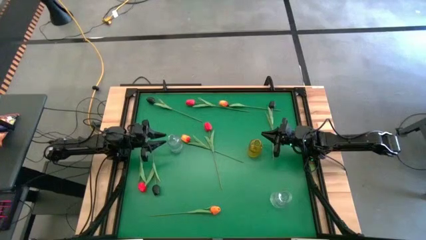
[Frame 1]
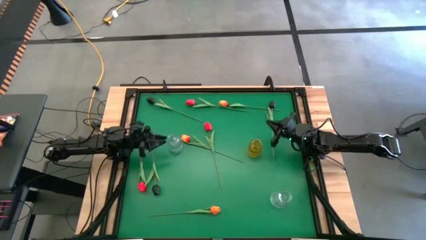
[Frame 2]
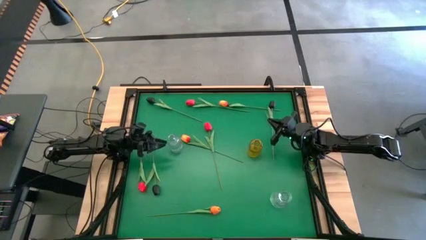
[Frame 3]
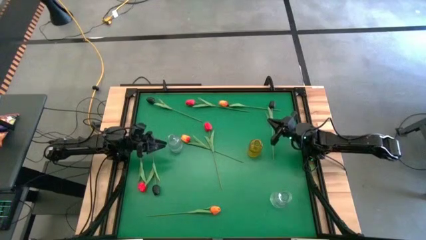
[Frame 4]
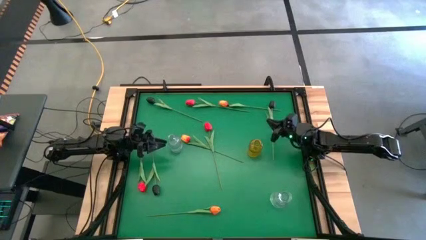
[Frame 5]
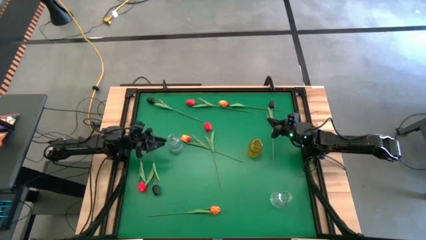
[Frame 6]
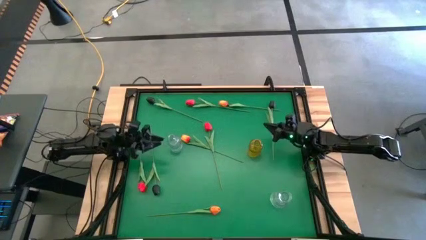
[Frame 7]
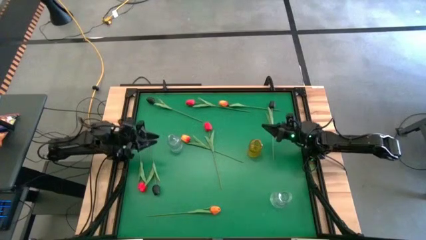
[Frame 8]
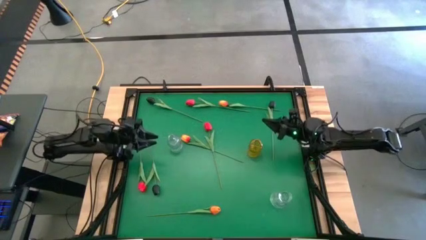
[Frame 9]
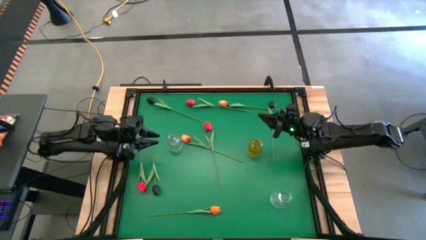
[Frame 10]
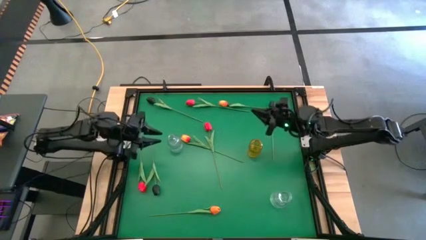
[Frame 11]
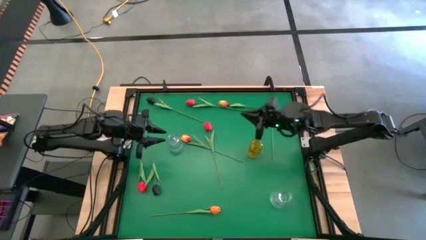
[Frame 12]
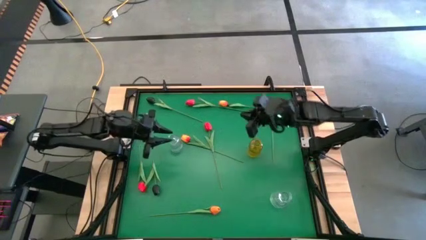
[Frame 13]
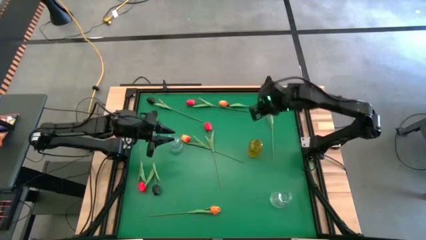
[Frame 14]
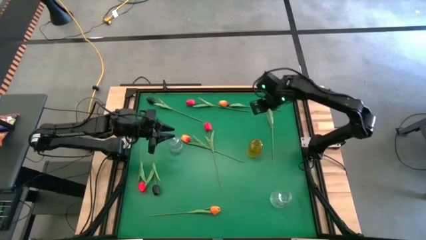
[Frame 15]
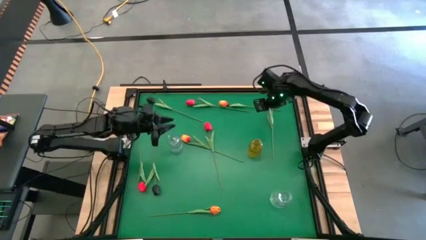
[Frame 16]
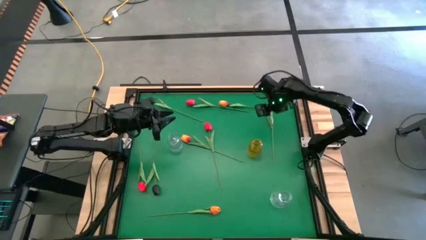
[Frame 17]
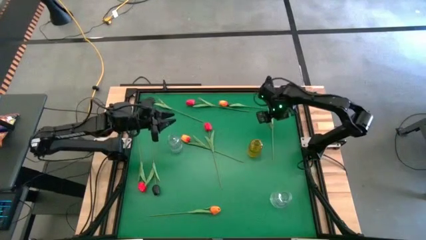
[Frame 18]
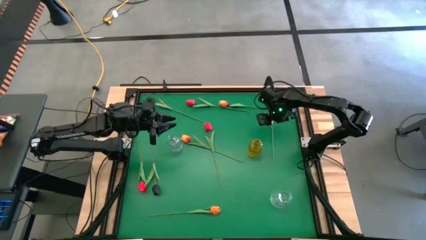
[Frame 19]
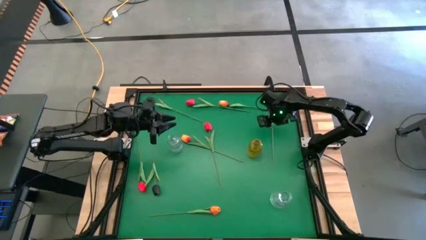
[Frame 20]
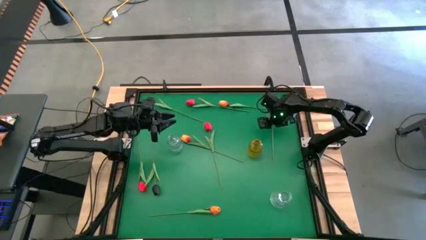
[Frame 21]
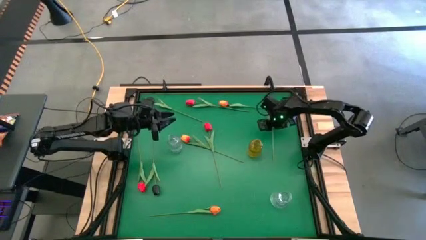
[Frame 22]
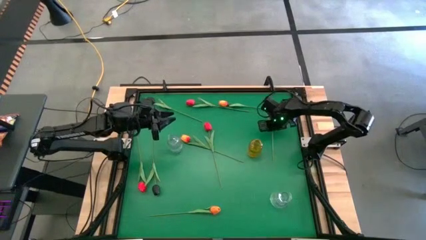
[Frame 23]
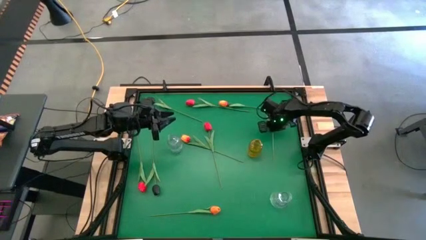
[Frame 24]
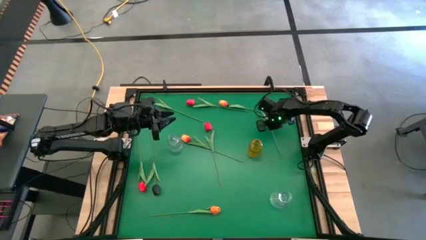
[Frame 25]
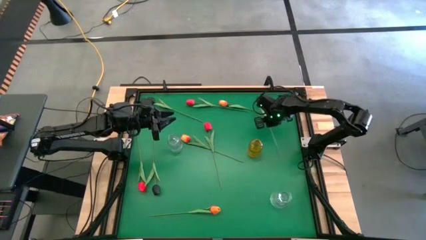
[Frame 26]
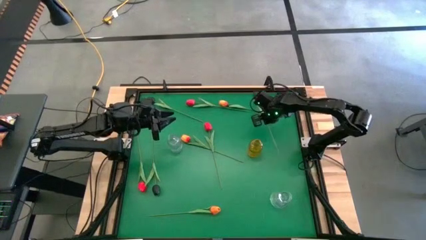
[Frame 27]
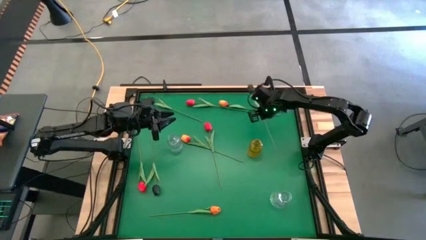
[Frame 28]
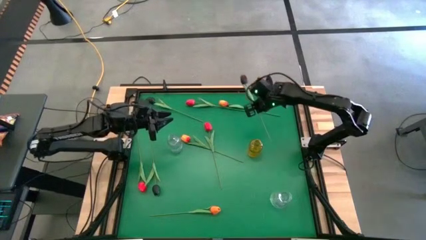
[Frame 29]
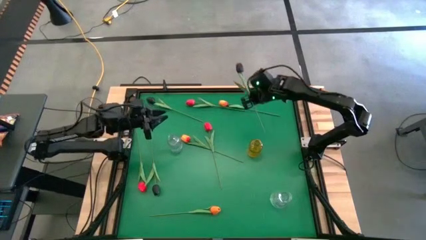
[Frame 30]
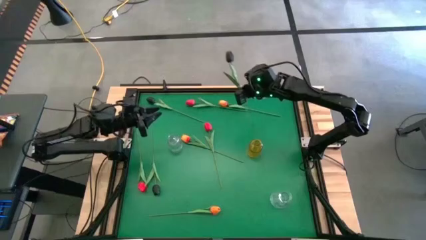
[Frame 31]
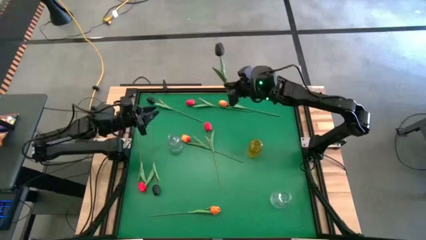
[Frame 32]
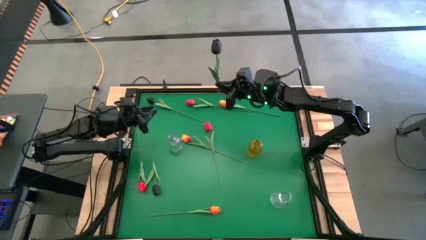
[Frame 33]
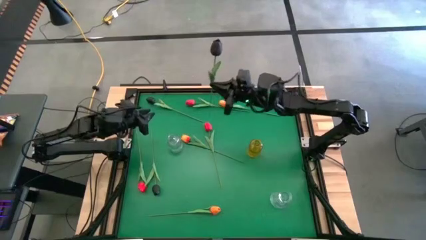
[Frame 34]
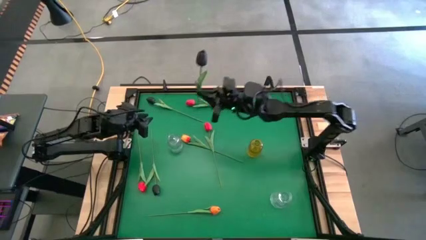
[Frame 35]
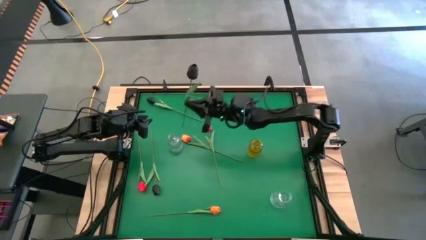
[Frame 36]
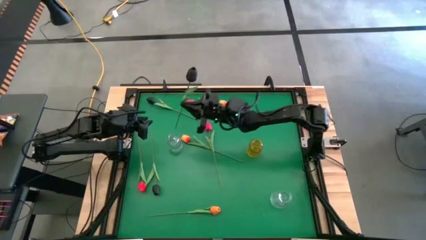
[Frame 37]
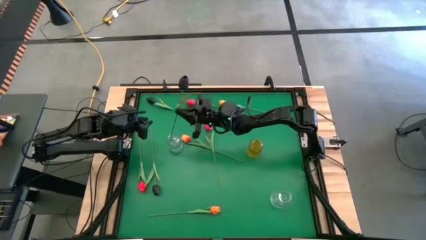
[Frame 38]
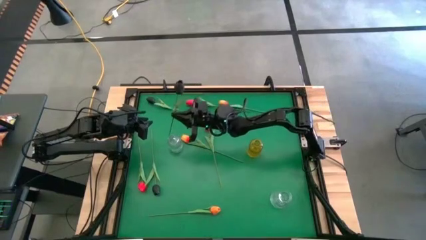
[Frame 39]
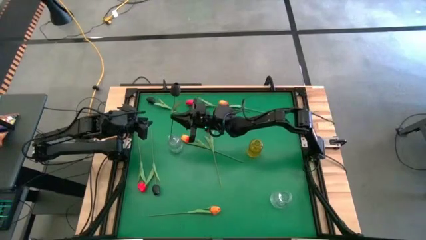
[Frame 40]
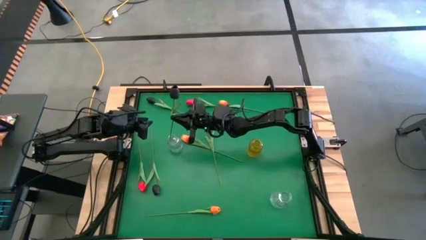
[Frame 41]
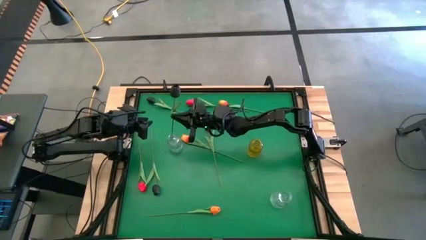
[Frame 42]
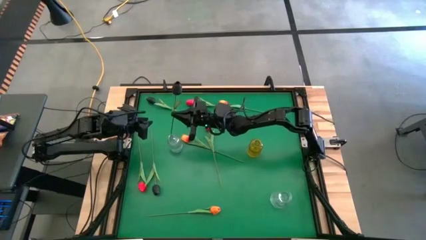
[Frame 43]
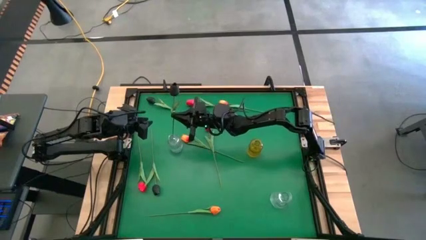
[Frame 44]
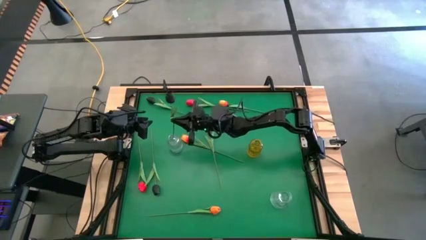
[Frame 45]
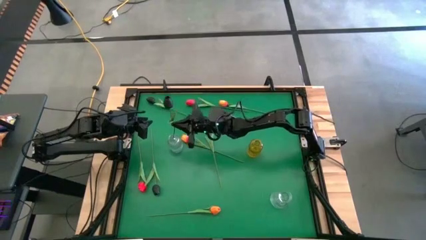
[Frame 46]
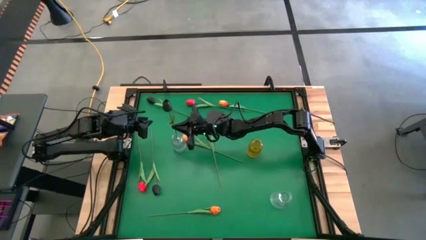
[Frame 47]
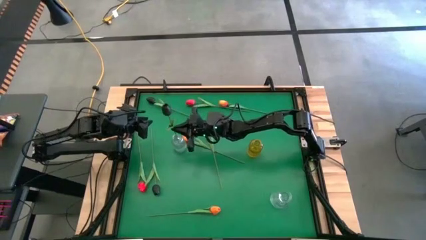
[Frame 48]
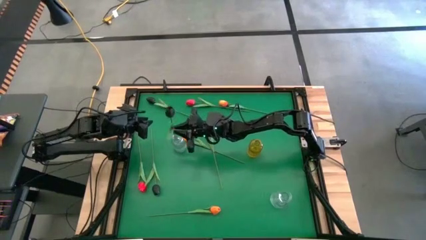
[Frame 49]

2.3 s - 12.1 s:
Task: Sort flowers into vase by color
Put the top right black tulip into the top transparent vase

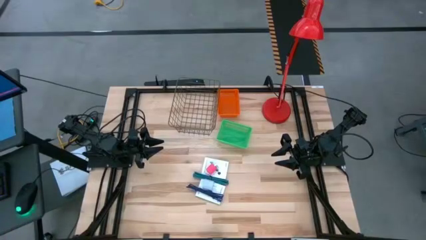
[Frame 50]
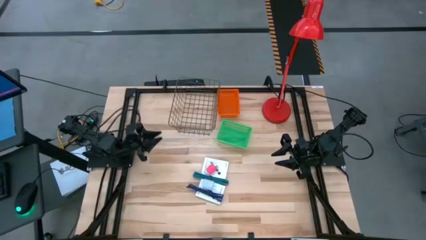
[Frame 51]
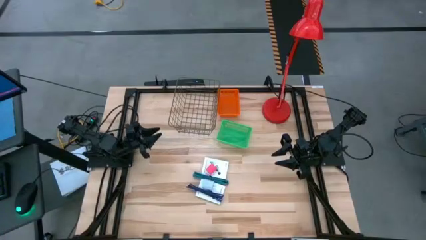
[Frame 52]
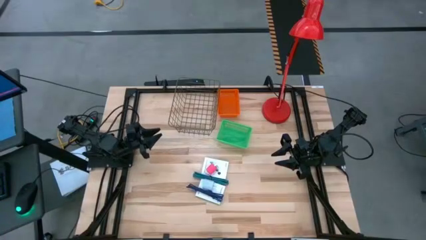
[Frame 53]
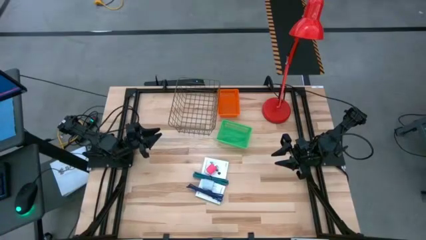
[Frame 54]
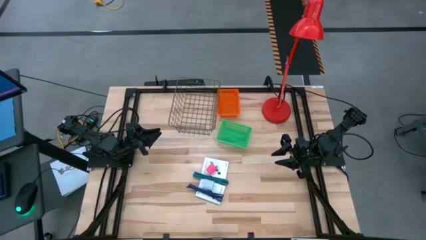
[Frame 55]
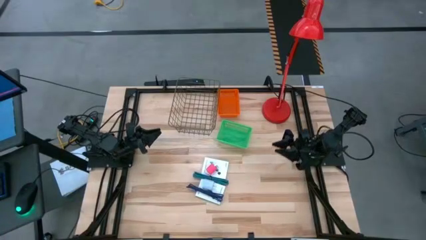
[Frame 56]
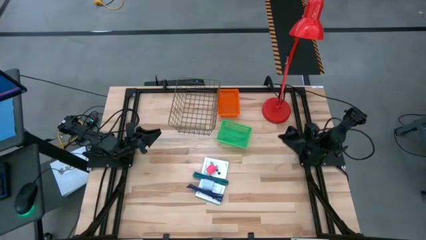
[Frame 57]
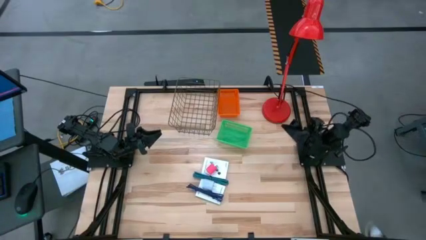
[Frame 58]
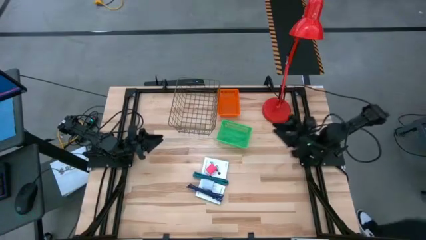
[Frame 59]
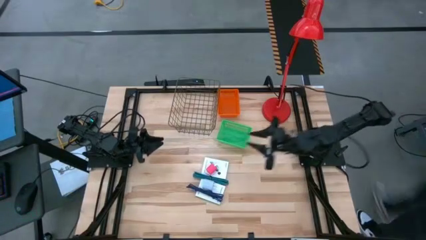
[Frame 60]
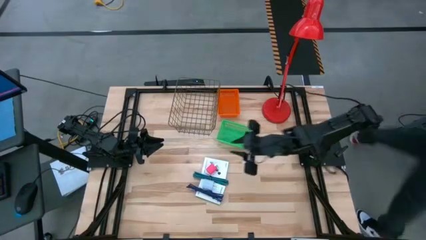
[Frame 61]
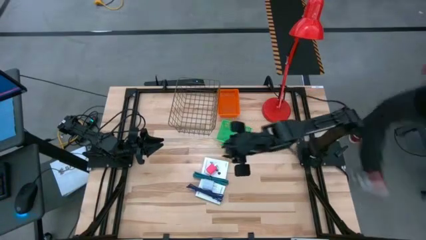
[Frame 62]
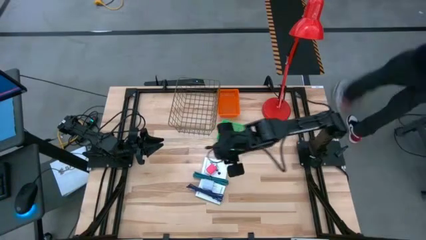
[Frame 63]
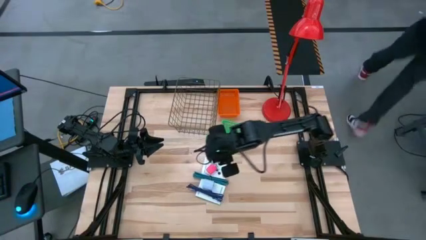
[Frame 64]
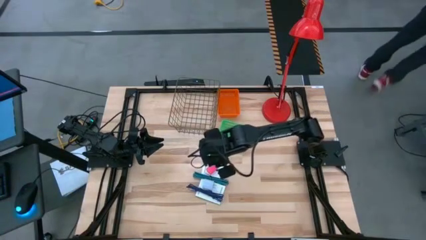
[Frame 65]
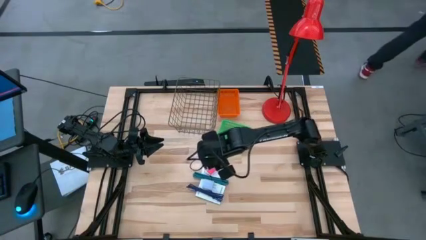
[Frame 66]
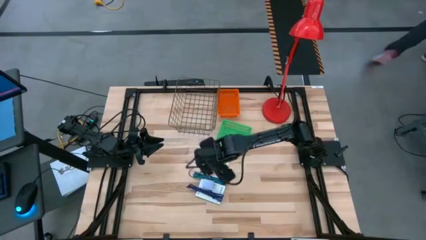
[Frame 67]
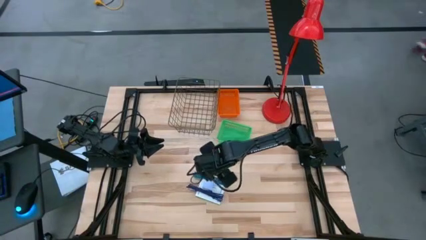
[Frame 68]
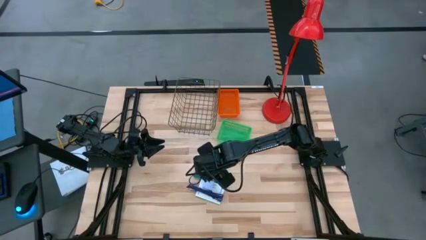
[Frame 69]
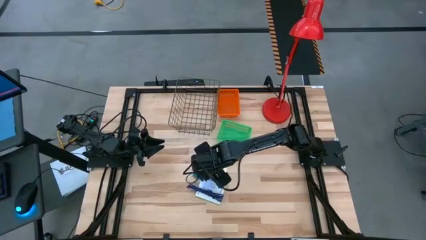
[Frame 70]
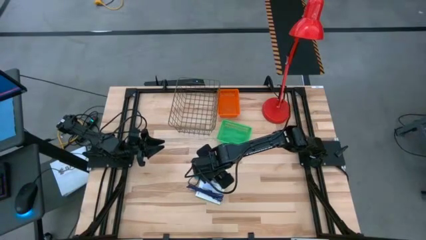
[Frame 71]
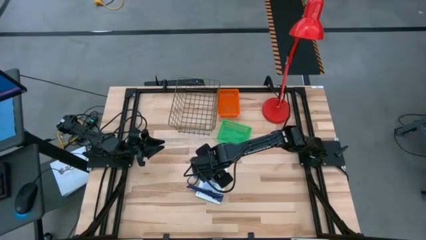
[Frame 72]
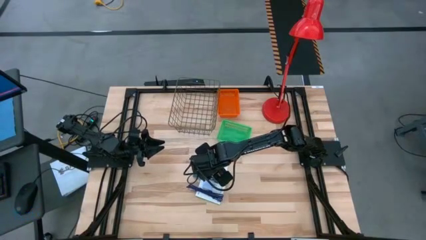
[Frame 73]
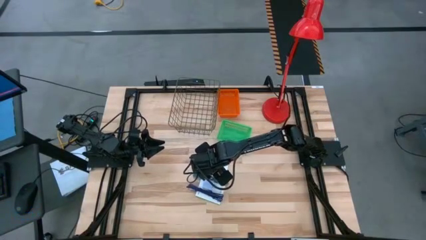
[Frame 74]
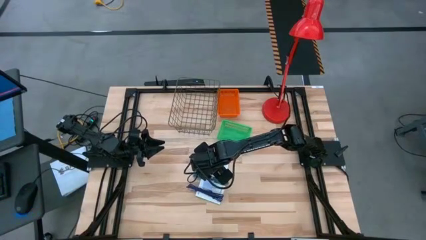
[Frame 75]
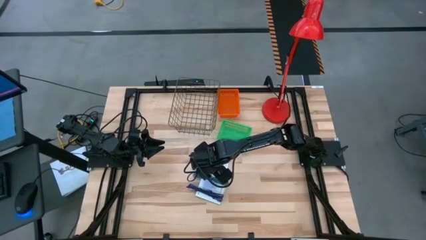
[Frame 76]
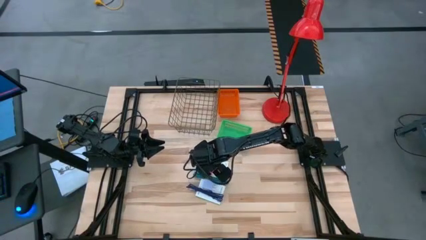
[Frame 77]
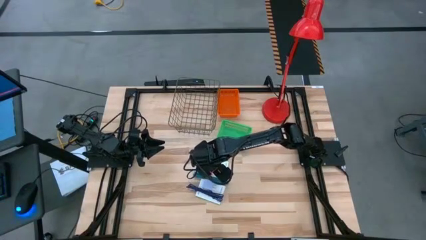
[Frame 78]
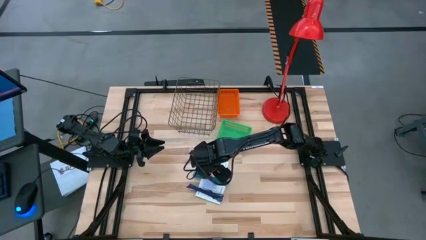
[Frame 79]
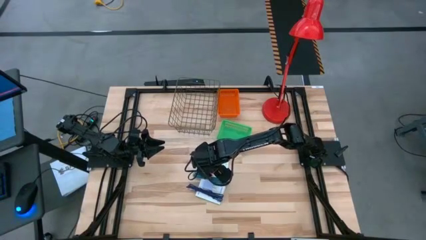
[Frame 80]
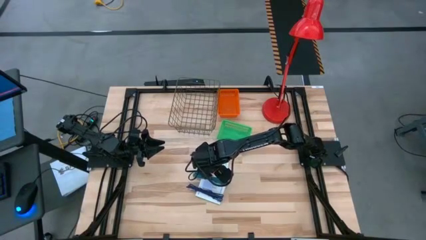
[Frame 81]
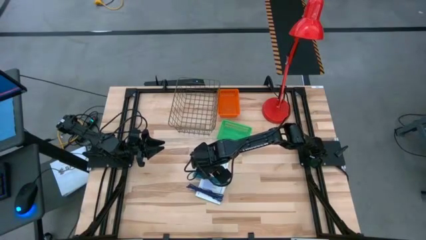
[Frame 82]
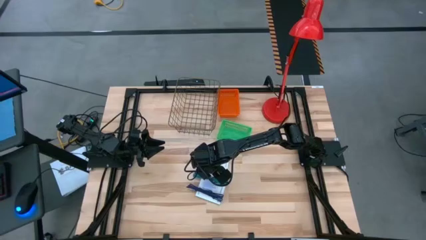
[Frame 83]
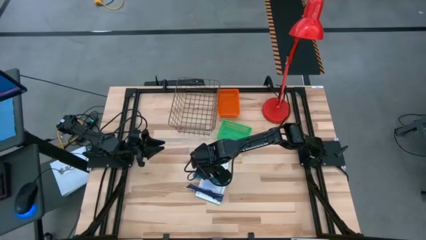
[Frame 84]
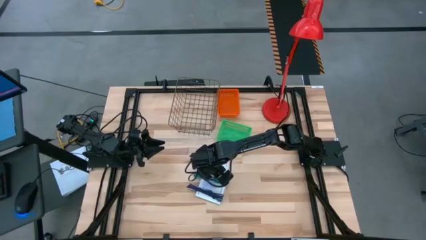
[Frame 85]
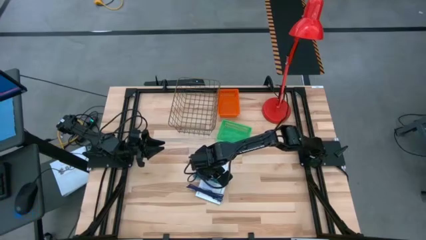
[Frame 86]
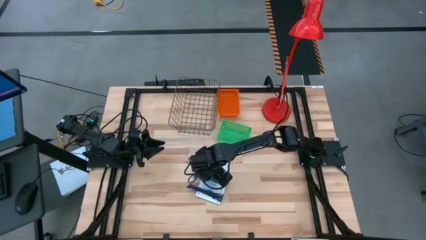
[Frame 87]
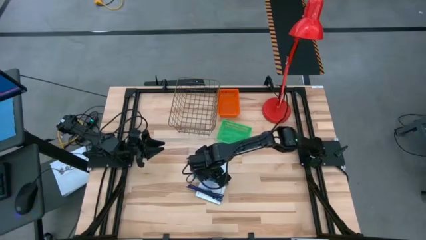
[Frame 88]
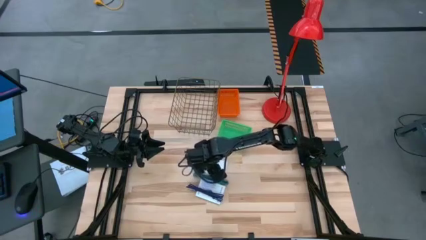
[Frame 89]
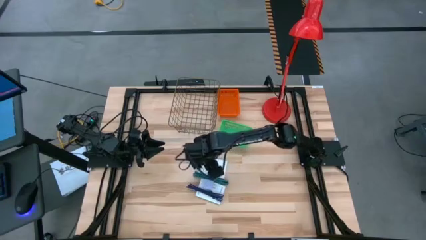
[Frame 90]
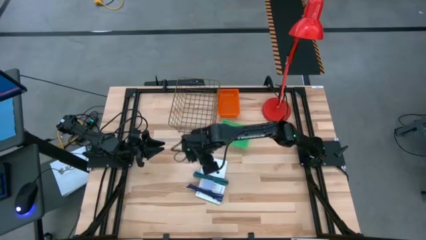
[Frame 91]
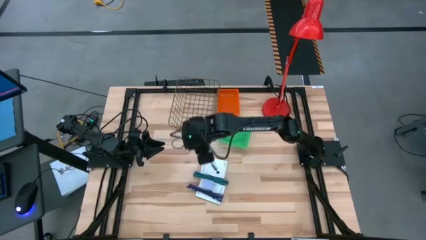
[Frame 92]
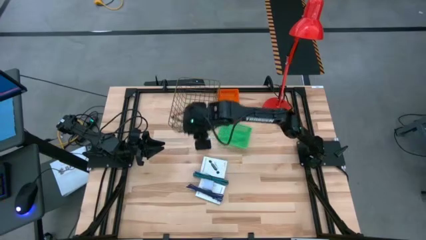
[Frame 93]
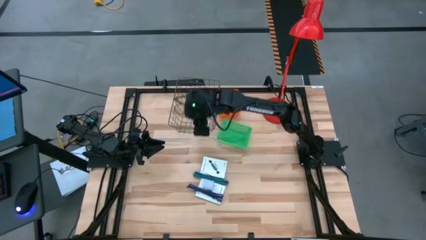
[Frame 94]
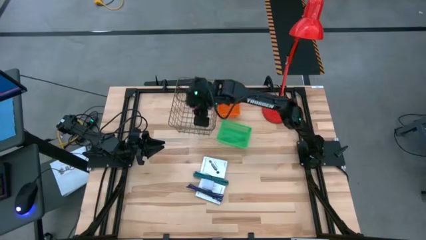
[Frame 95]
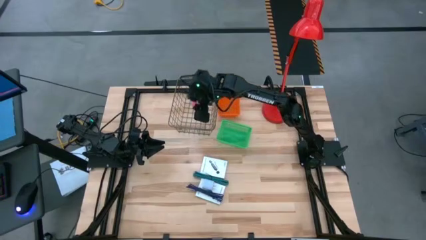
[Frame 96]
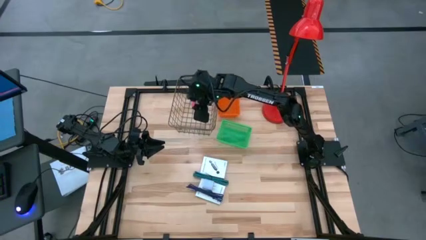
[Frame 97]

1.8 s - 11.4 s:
Task: Pick and place items into bin
Put the pink charger adapter into the wire basket
